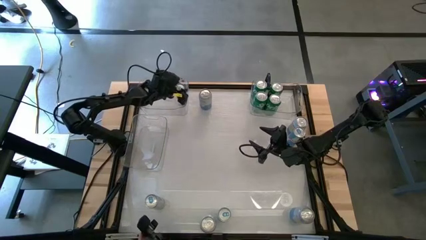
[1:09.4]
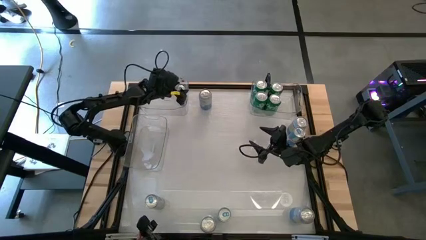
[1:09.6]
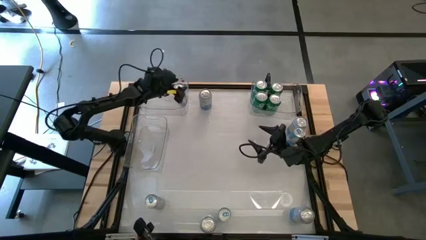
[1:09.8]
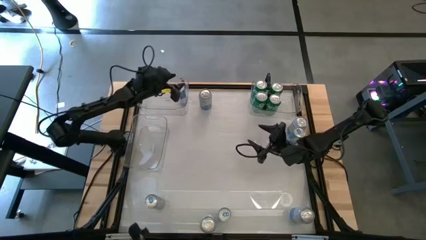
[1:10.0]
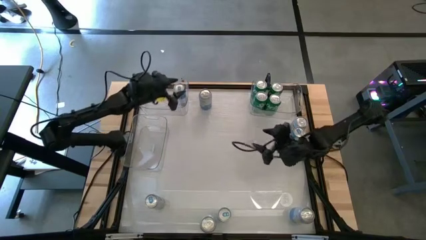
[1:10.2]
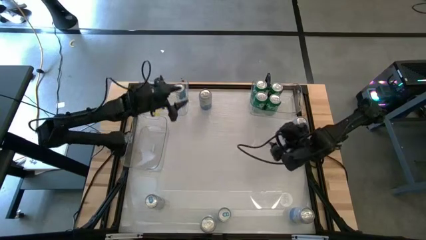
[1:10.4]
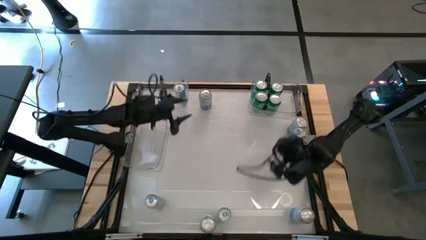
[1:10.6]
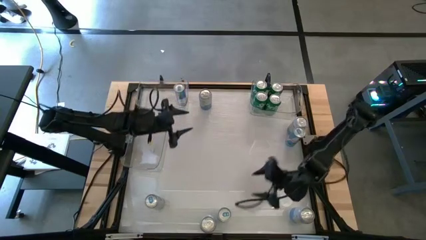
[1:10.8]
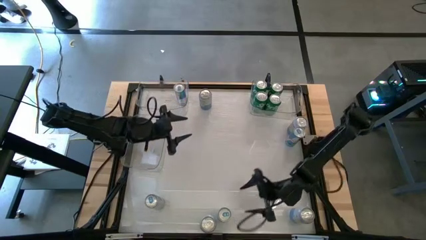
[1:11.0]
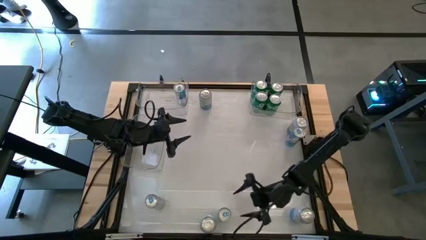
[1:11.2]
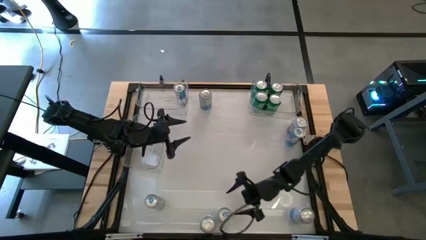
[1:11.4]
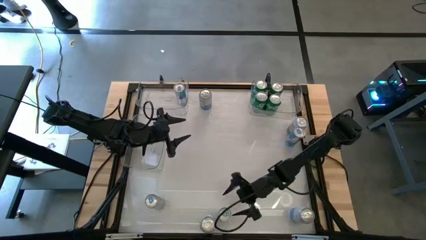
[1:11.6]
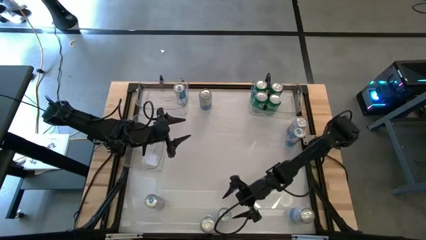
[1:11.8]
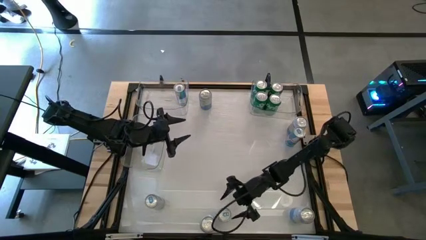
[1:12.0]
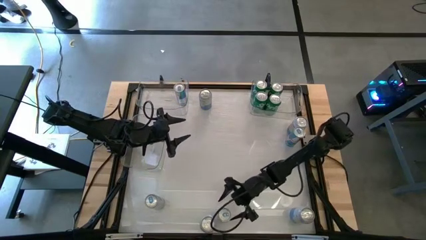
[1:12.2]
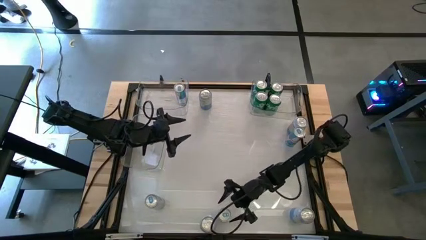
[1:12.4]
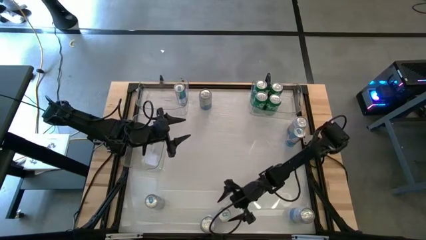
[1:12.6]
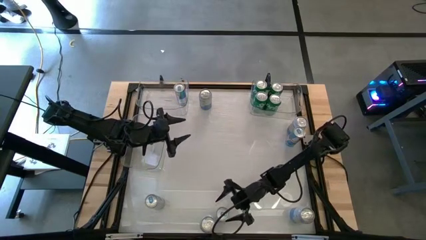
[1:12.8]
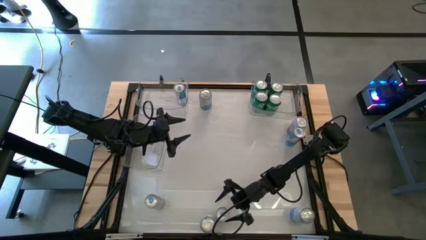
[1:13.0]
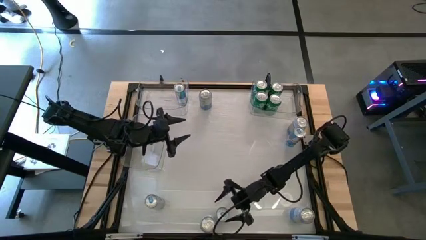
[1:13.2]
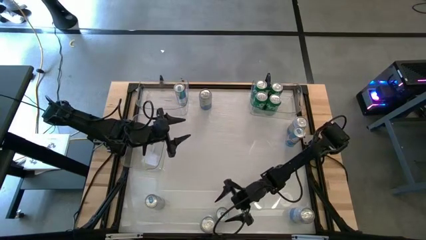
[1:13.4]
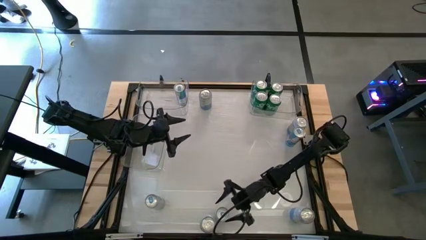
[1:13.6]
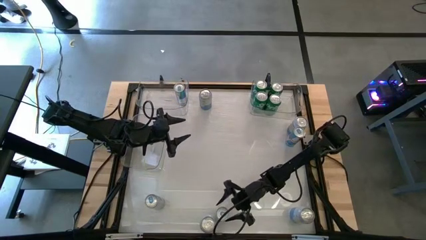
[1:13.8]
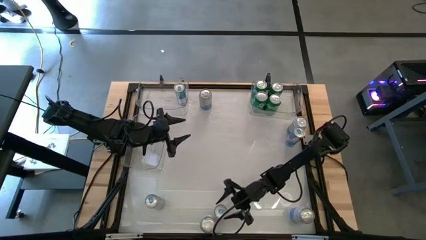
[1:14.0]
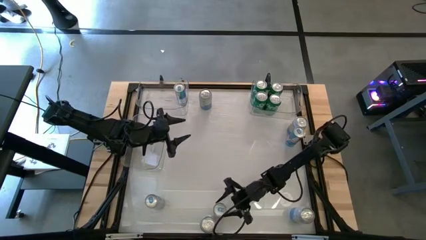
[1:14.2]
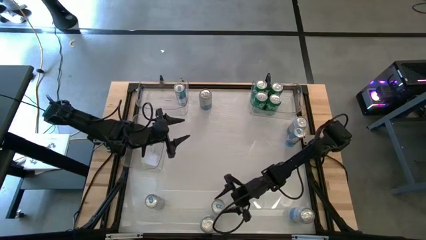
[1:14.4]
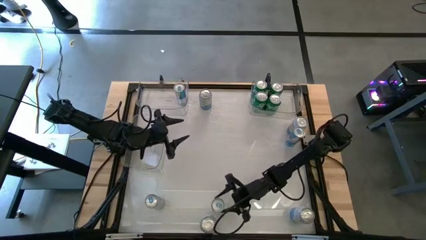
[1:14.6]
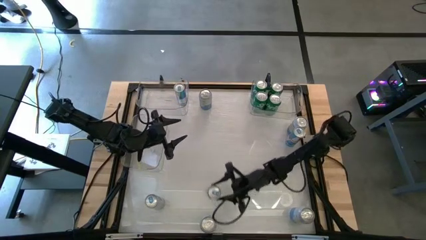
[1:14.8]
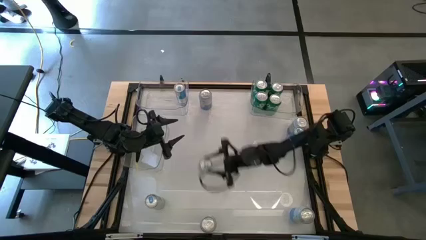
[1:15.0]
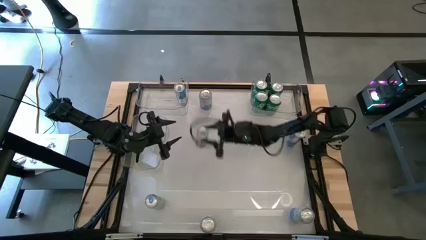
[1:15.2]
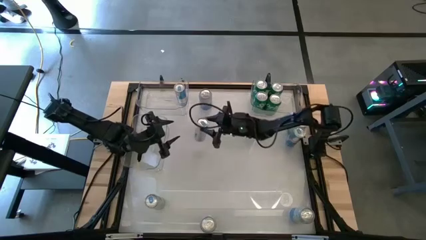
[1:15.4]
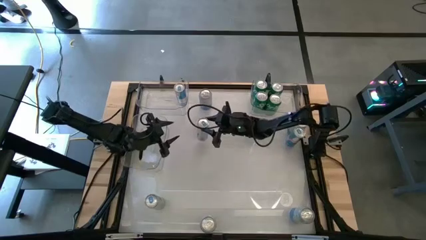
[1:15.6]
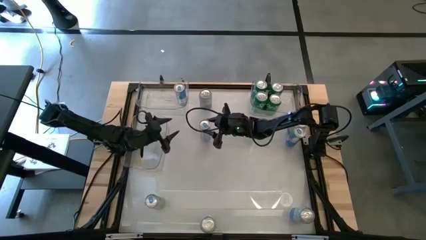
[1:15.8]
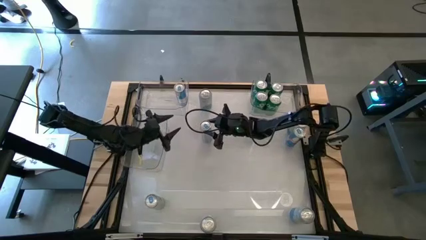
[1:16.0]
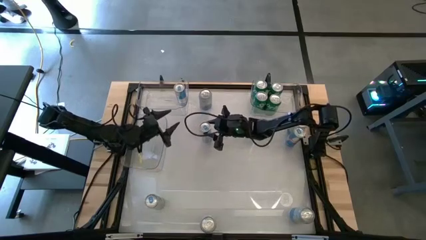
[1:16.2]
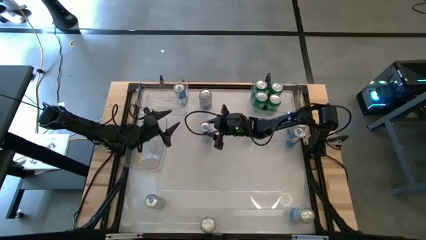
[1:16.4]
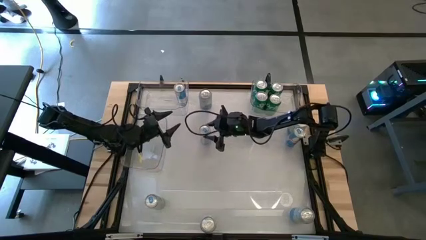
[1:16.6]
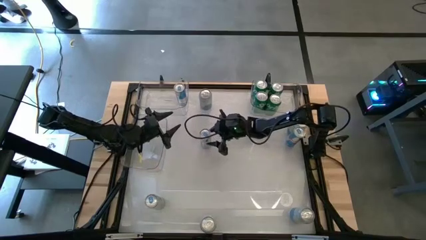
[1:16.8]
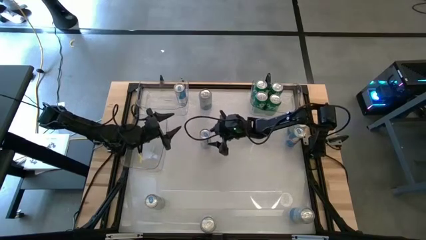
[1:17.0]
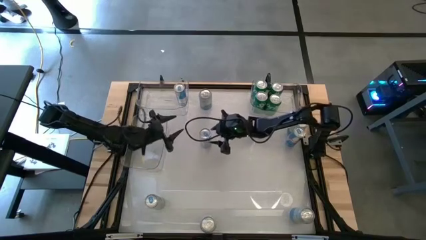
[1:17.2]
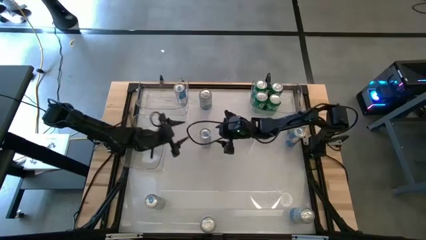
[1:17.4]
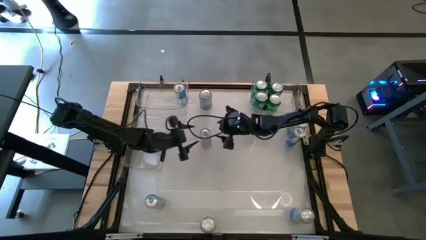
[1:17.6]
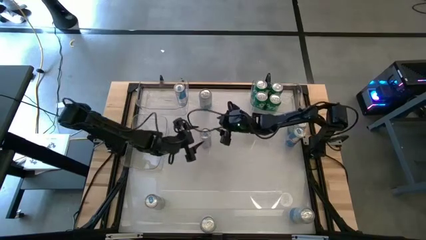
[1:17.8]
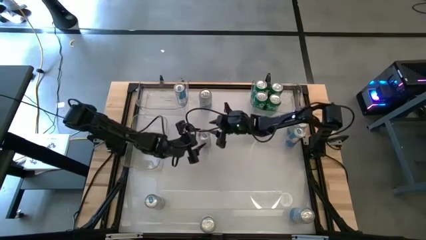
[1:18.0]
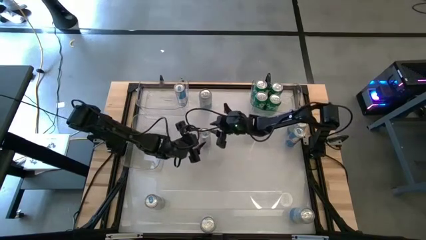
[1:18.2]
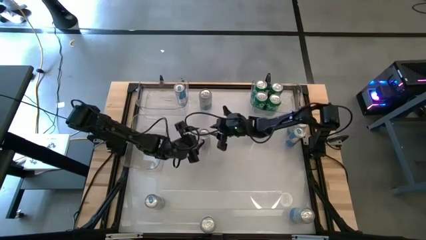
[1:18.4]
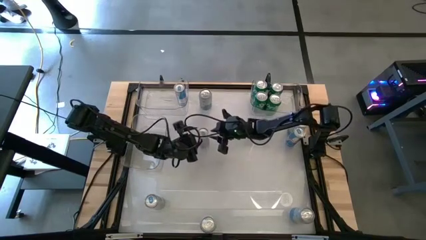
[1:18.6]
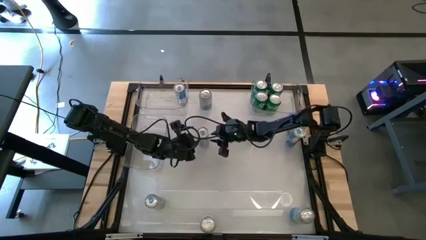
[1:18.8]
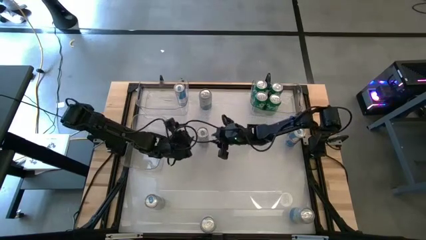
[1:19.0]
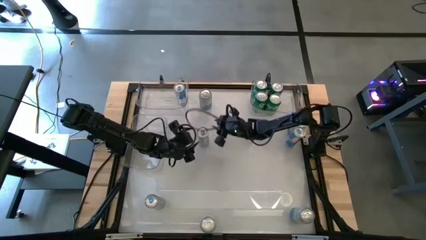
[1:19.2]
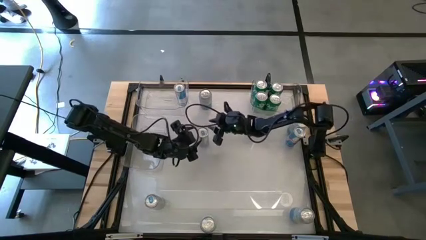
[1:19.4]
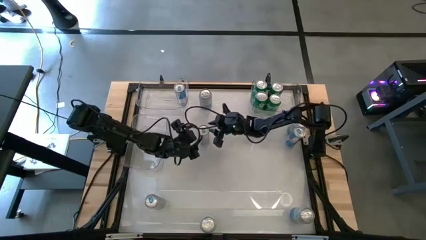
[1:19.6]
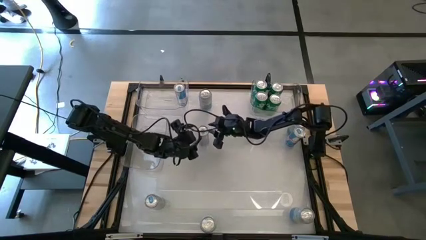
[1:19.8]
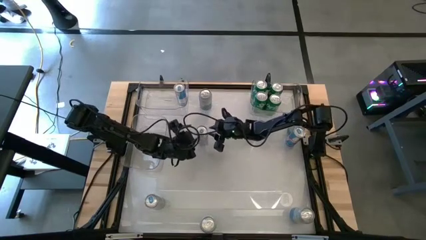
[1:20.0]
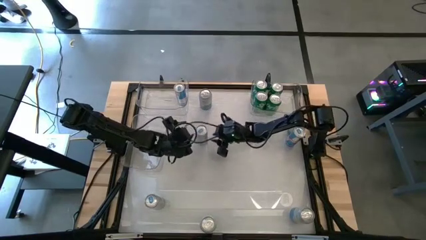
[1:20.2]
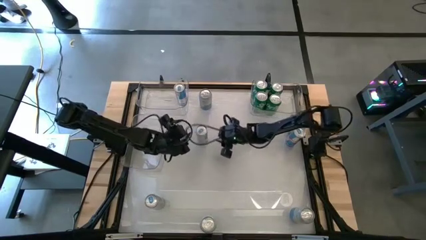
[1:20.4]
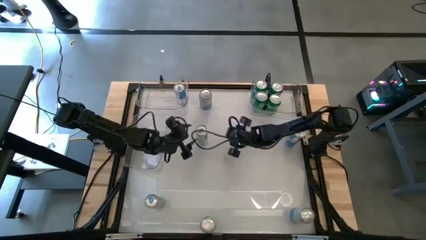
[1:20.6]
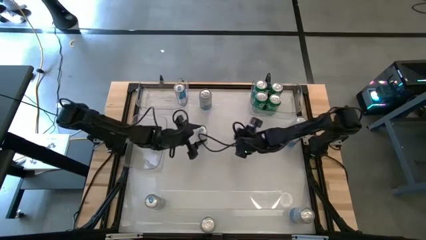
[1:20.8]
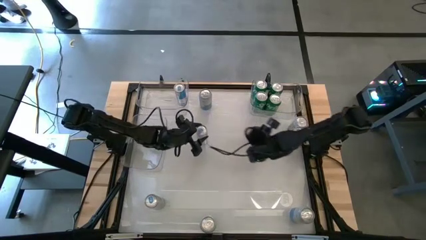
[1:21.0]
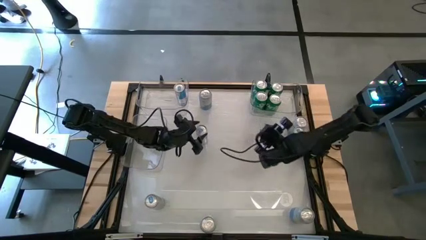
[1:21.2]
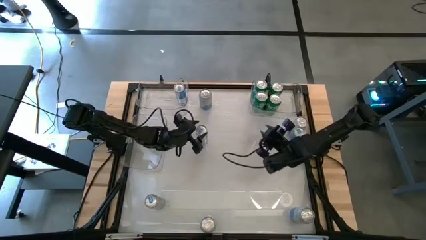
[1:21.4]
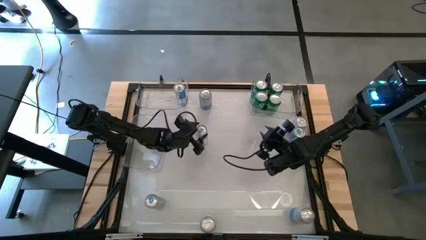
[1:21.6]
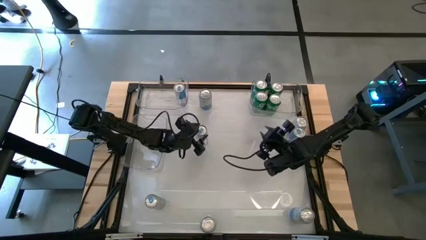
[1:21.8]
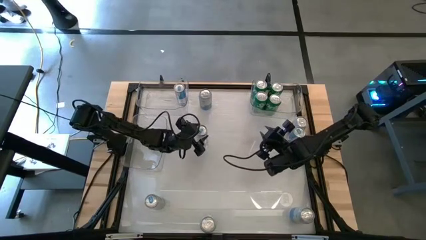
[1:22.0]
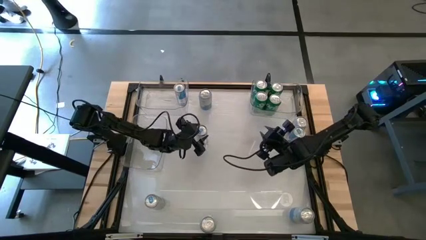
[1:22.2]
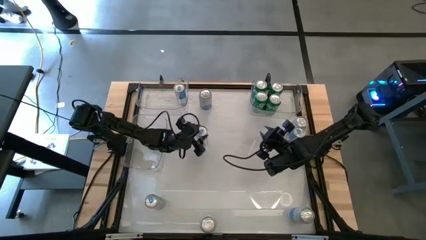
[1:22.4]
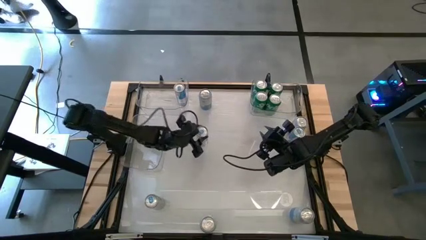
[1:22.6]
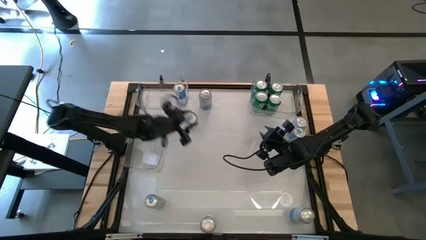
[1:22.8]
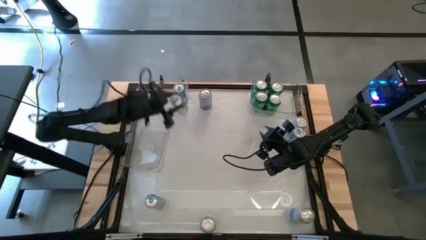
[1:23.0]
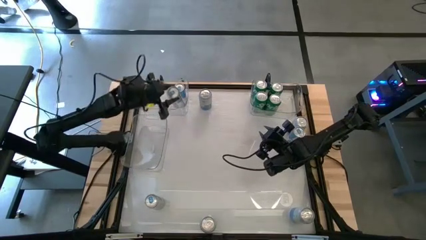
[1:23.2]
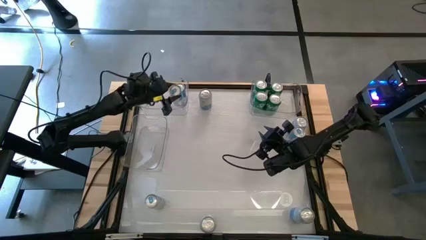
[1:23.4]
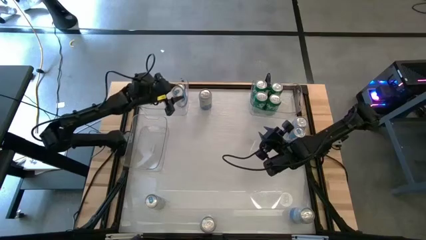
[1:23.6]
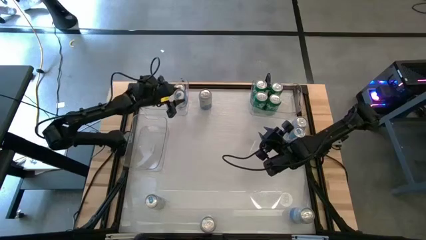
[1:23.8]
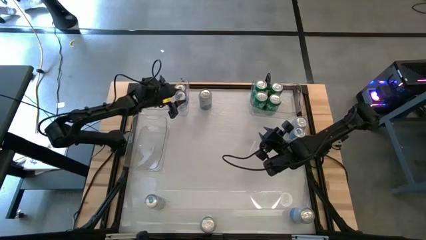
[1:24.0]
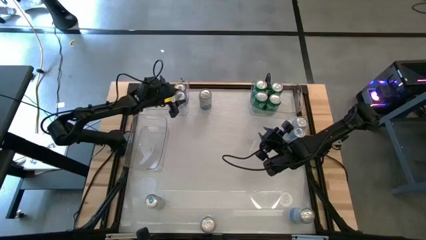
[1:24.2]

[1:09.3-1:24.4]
Task: Sort soda cans
Put the top left blue soda can into the top left transparent bin

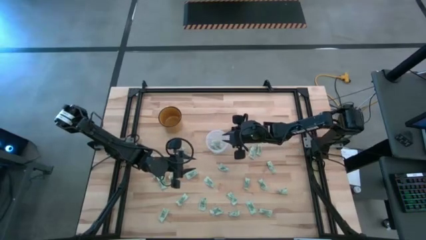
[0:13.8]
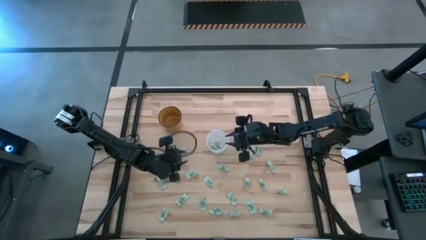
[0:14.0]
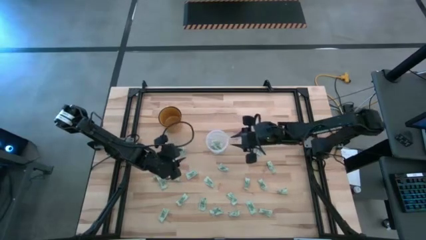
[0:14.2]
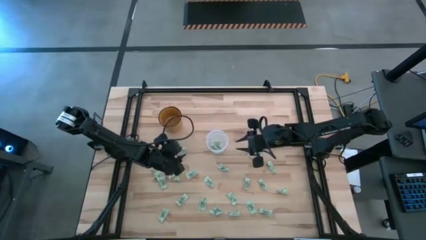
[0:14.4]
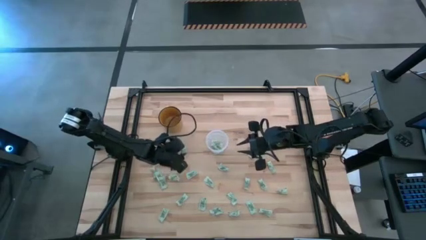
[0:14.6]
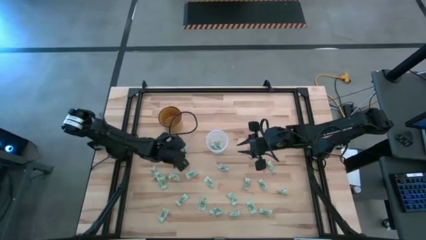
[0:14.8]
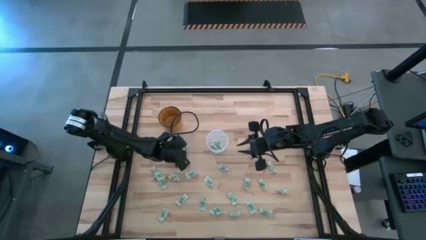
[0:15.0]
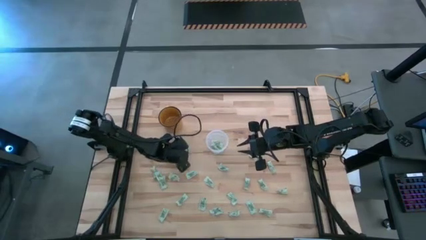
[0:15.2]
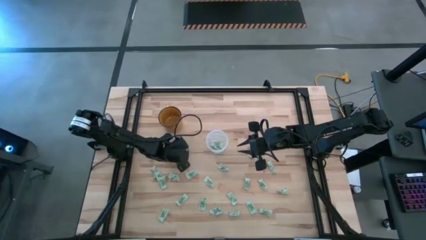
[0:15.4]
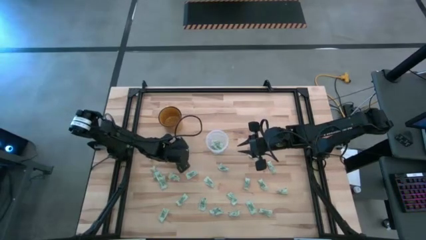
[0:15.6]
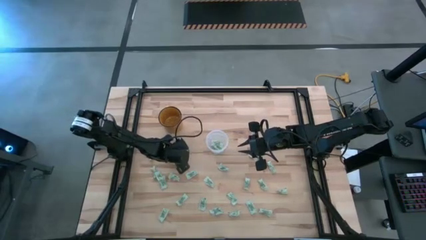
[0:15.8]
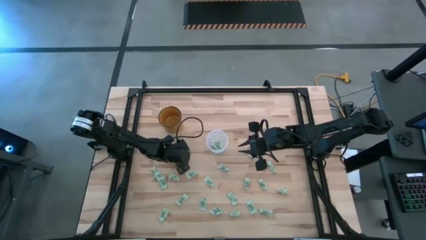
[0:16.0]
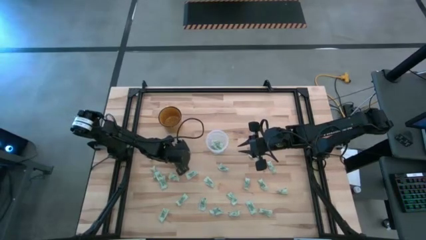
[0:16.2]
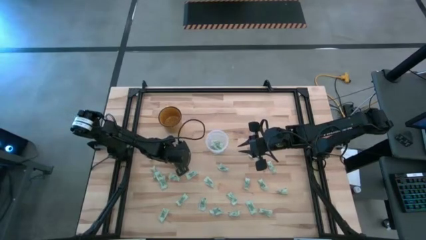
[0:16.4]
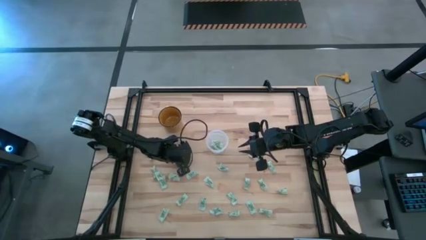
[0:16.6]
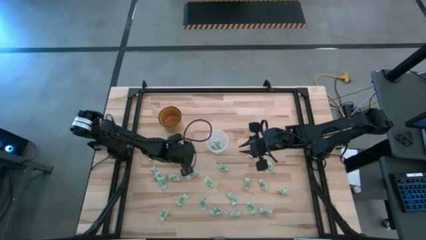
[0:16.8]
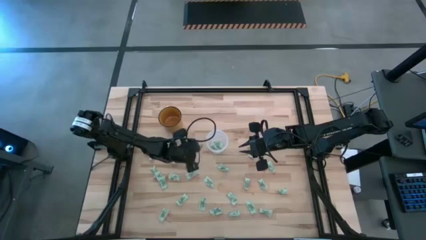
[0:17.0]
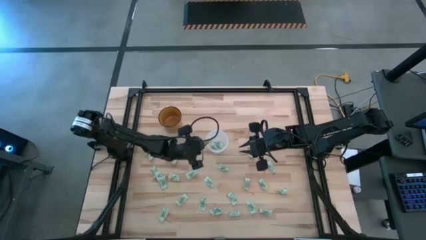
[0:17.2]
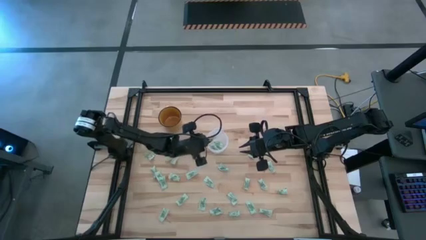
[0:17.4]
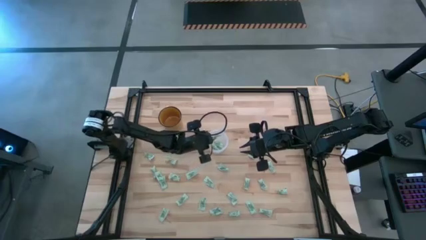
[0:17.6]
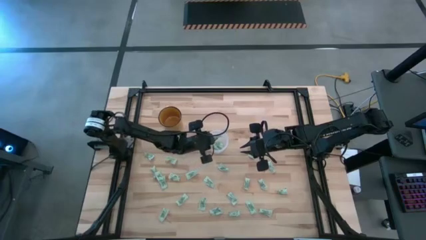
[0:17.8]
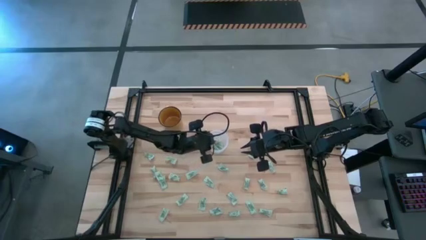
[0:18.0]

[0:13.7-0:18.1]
Task: Pick and place Stevia / Truvia into bins
Put the stevia packet into the transparent container
